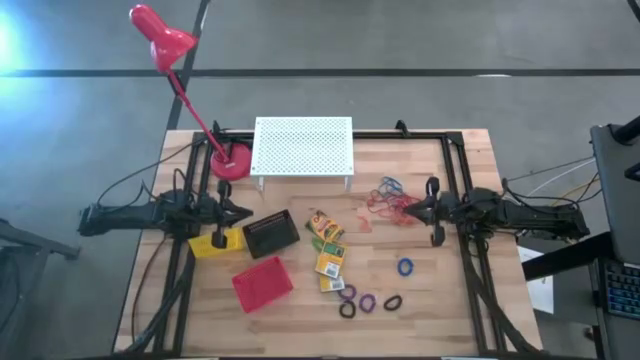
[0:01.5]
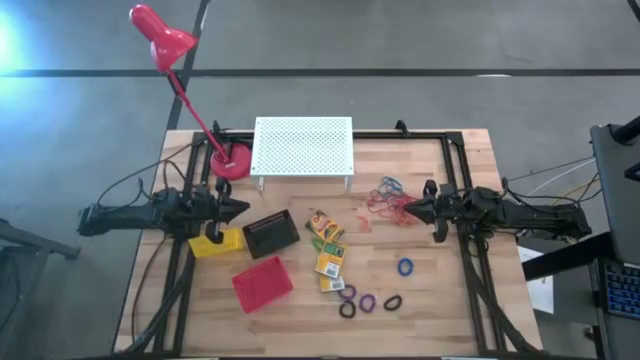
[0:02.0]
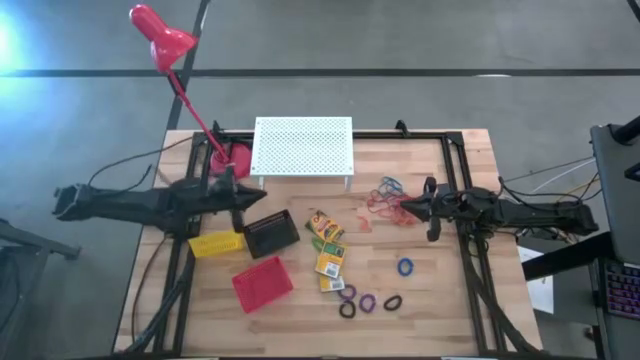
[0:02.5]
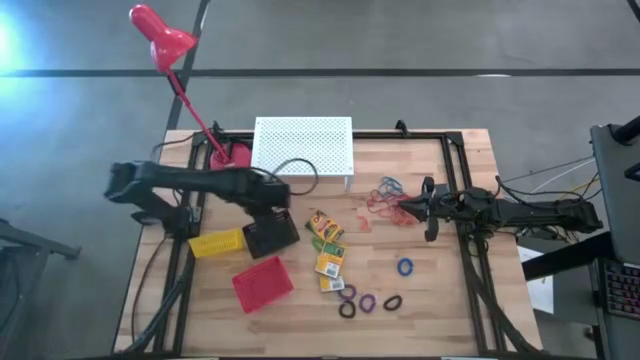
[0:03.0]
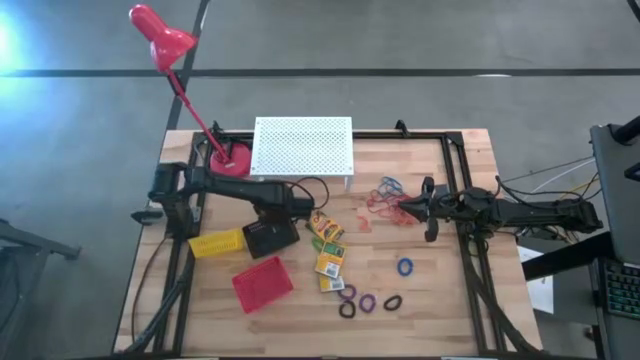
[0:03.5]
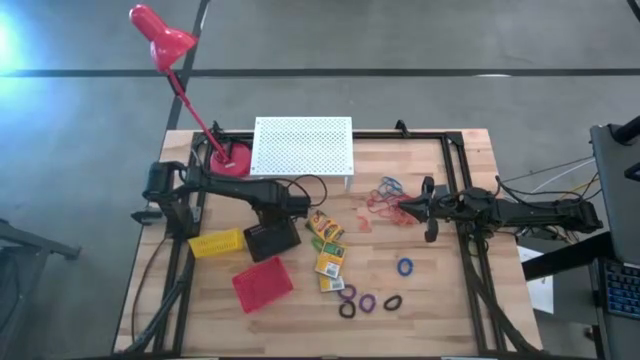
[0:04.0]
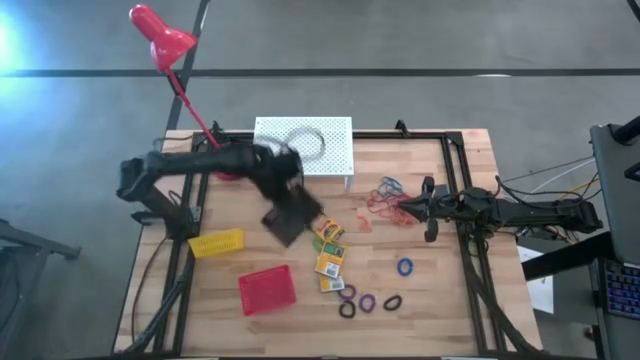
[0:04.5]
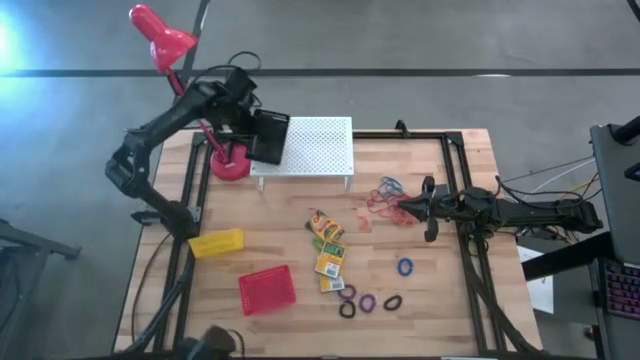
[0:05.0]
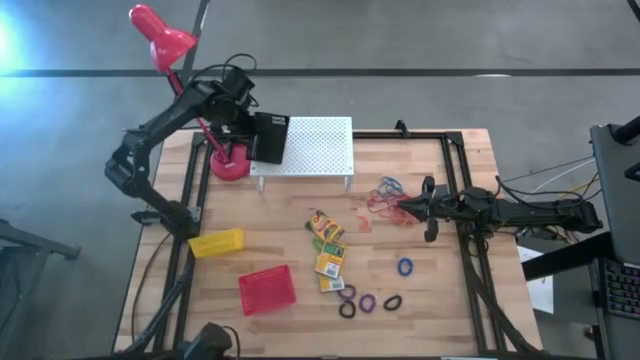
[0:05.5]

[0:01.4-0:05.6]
Task: Pick & Place Office Desk Supplies
Put the black bin on the shelf

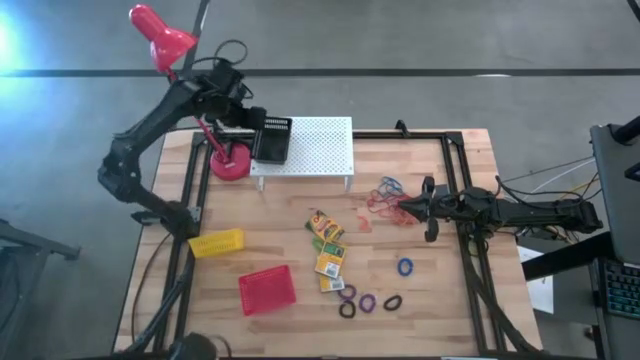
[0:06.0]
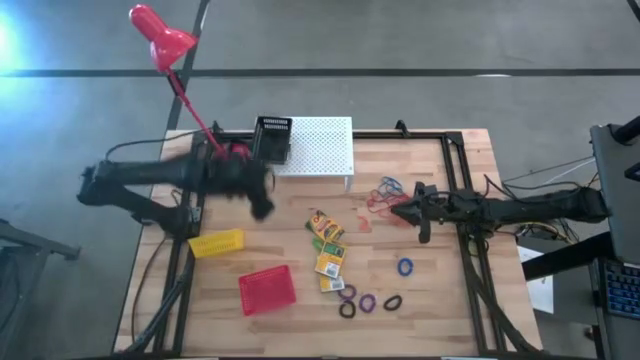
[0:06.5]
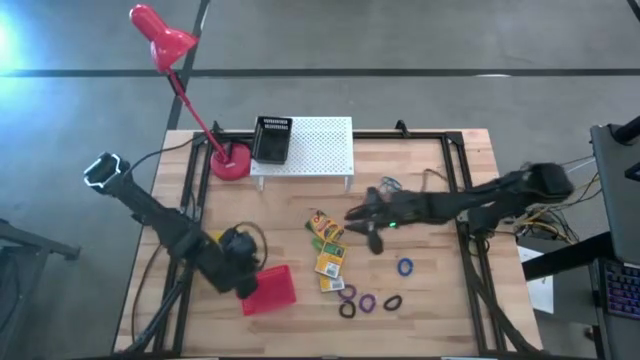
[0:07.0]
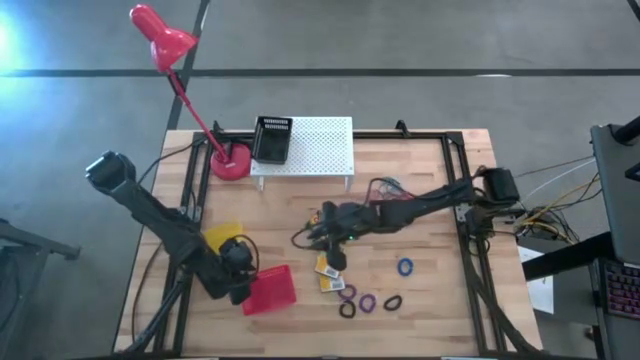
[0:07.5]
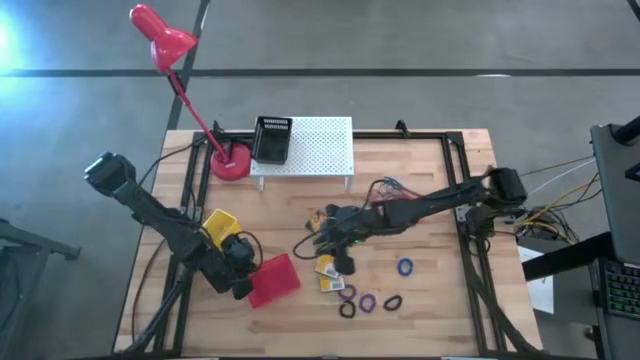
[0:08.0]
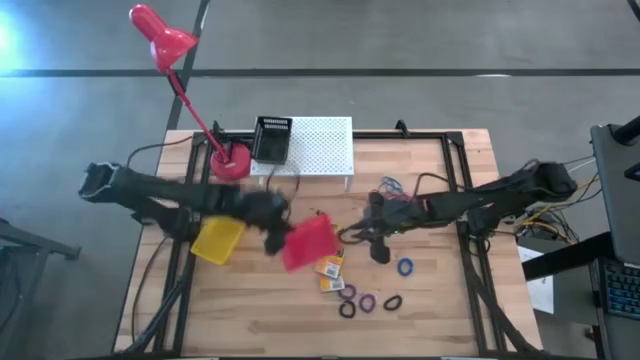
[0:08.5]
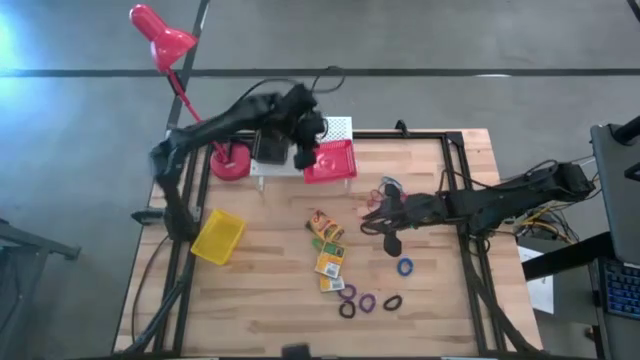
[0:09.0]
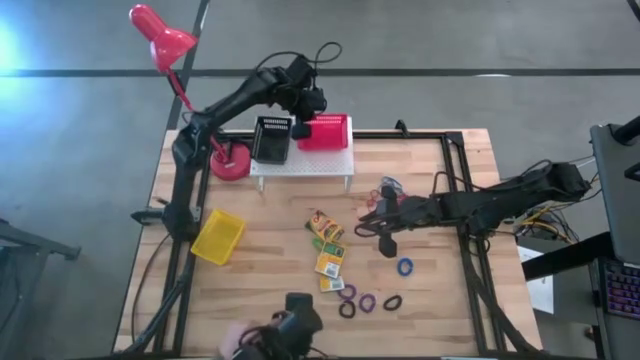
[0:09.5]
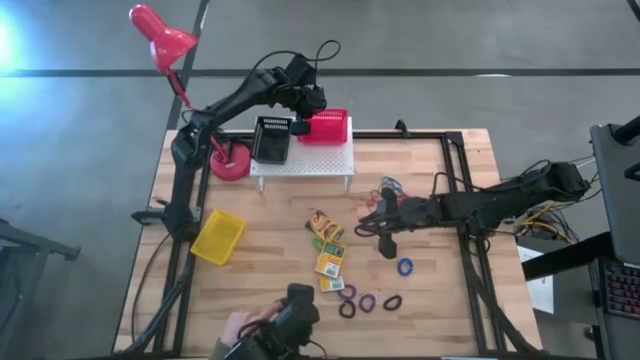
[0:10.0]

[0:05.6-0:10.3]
Put the red bin on the shelf on the shelf

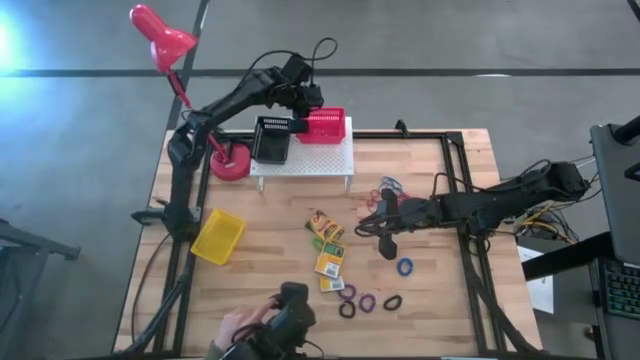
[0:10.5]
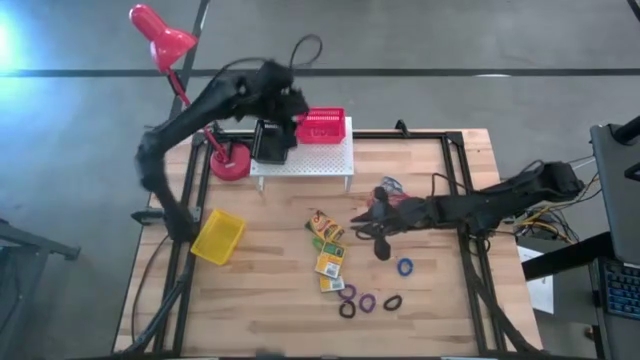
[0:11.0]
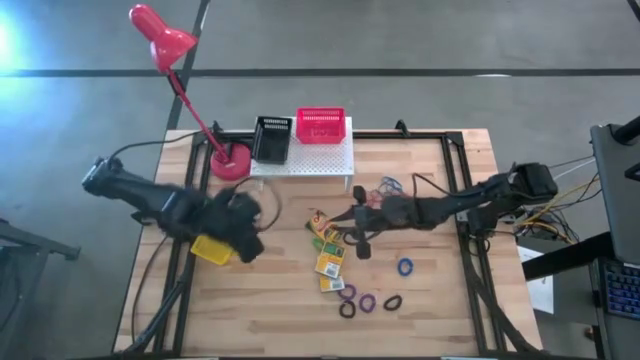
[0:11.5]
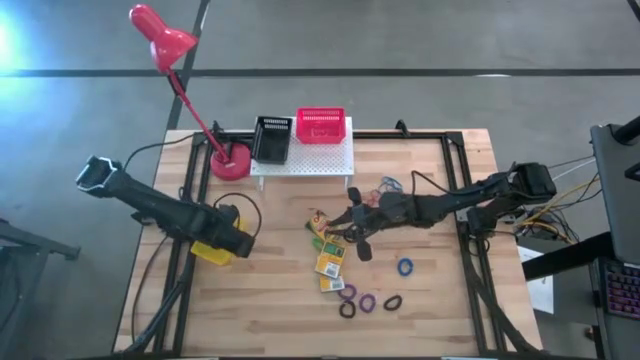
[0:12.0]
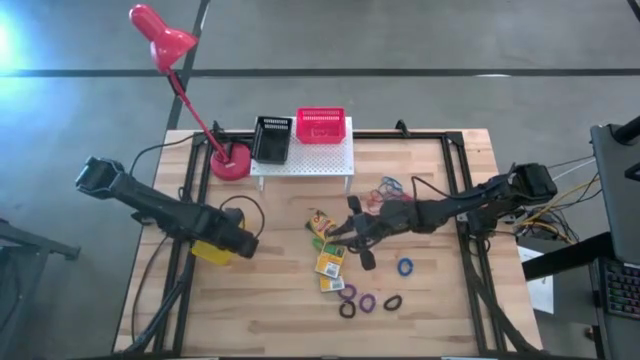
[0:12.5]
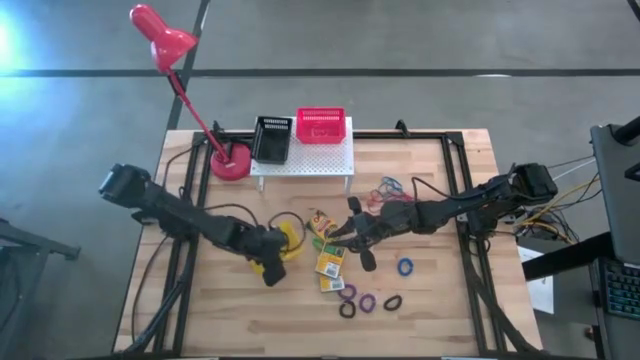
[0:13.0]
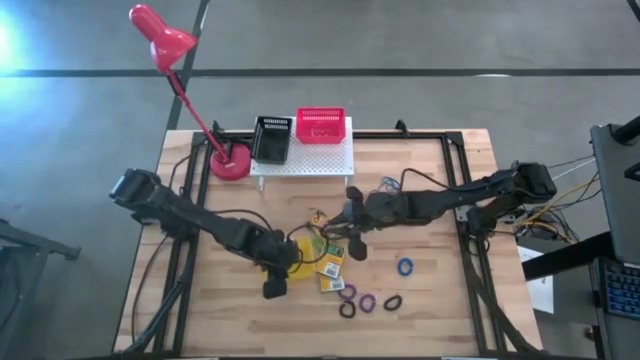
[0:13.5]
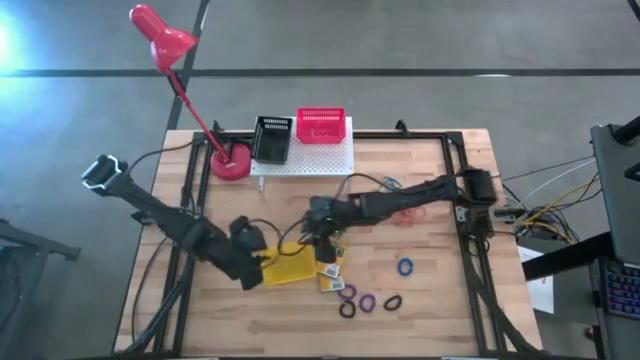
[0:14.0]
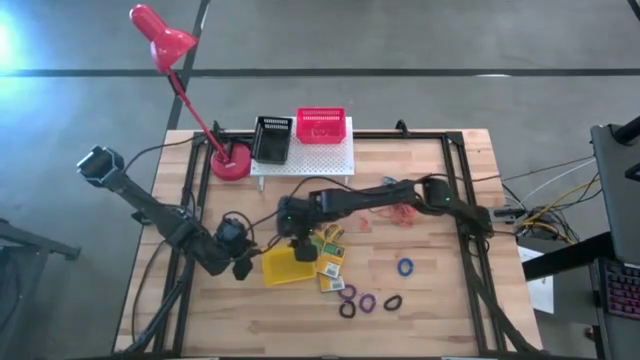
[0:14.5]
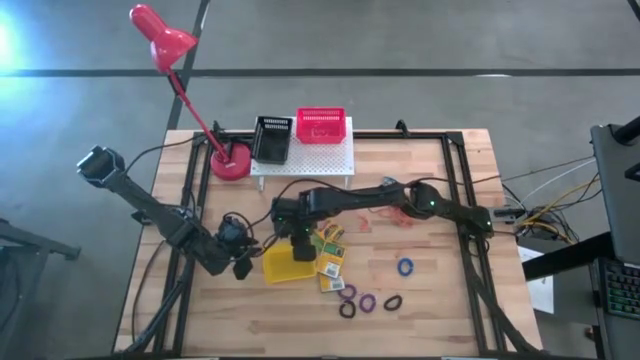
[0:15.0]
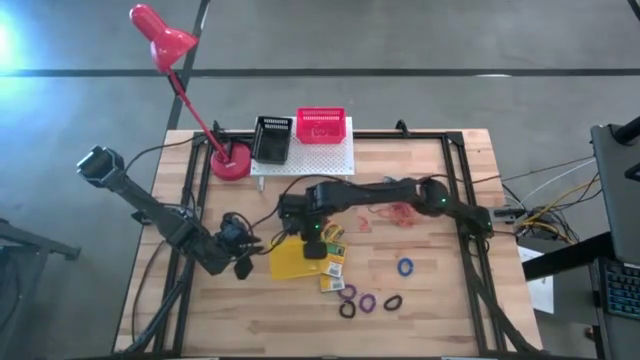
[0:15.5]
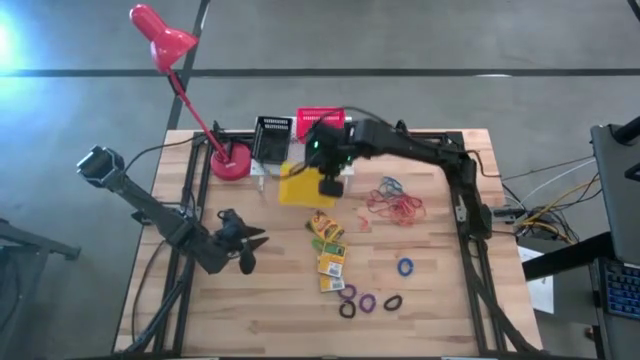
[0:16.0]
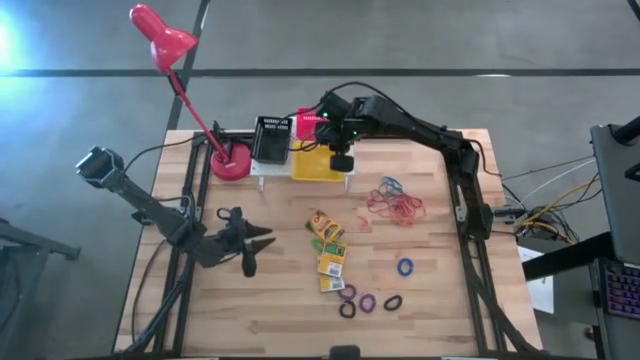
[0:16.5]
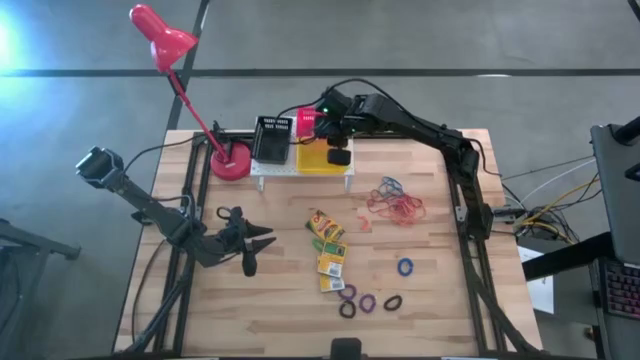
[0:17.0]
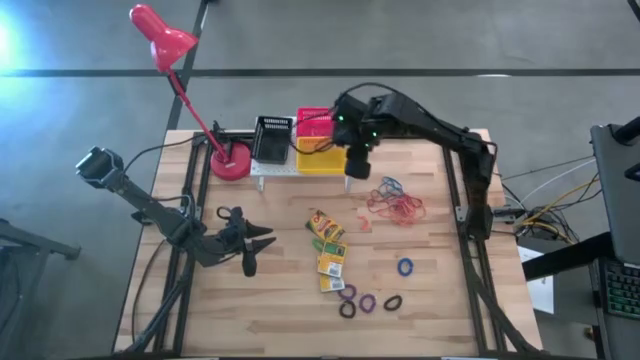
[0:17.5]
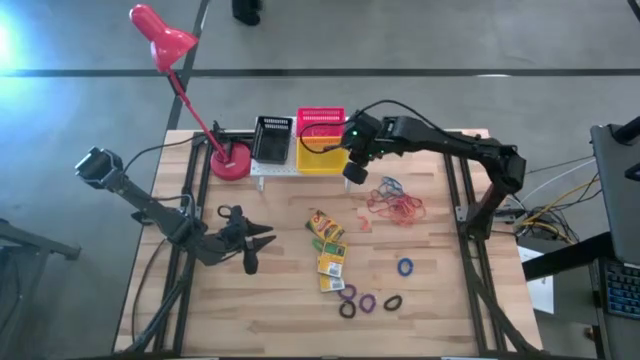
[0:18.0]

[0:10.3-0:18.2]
Put the yellow bin on the shelf

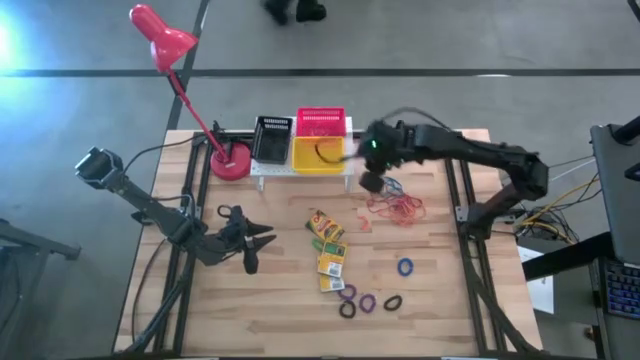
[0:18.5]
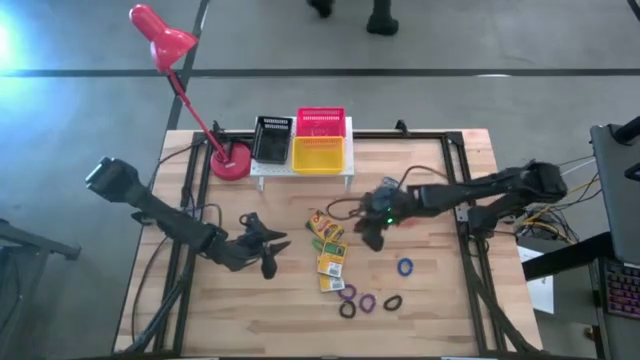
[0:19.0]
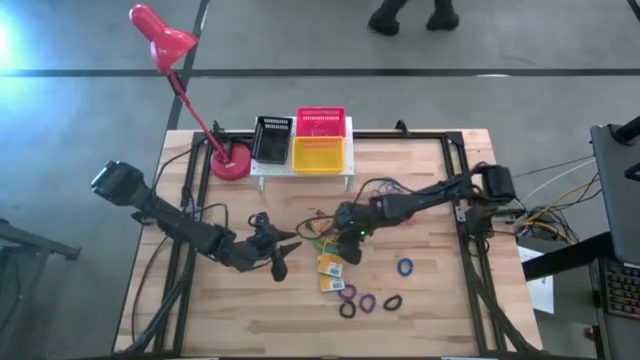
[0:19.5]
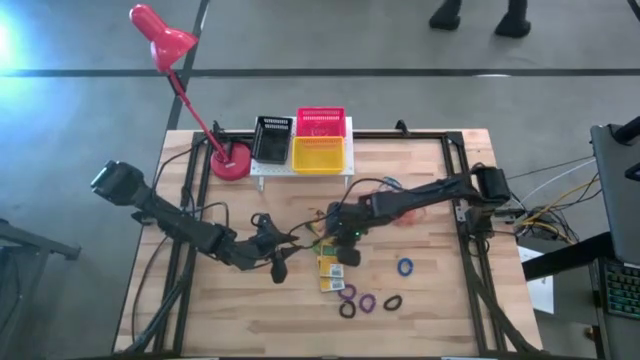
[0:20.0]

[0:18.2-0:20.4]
Put the center yellow crayon box into the yellow bin on the shelf

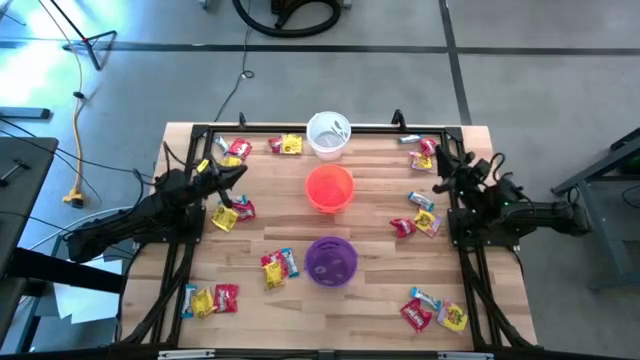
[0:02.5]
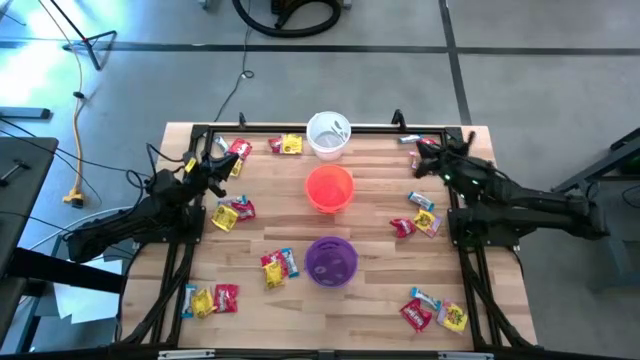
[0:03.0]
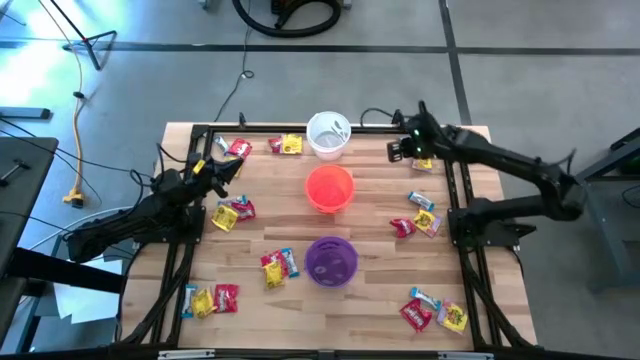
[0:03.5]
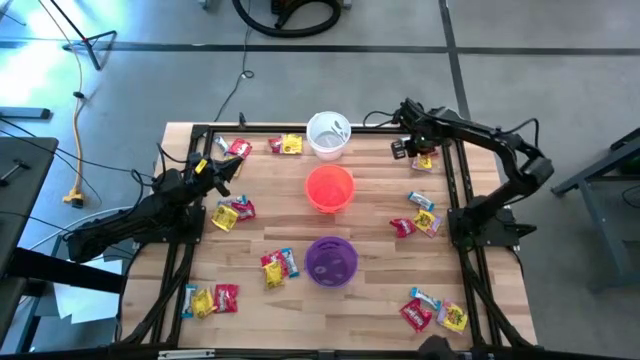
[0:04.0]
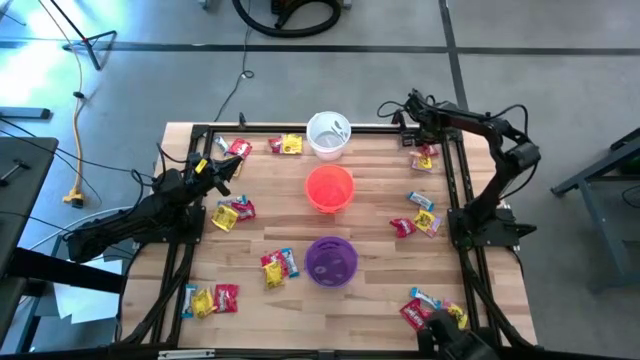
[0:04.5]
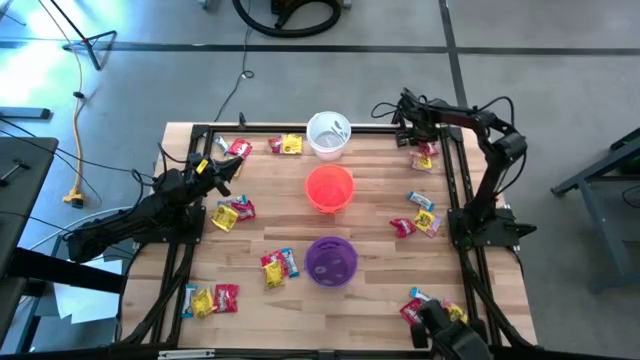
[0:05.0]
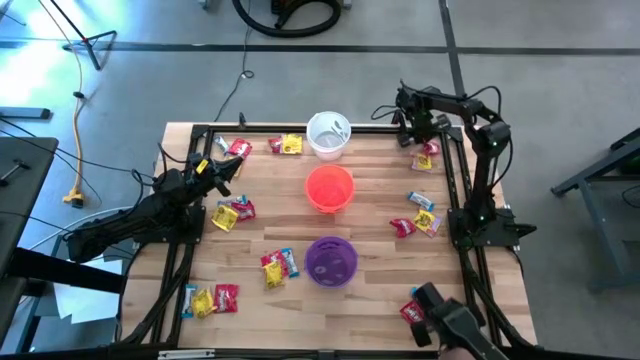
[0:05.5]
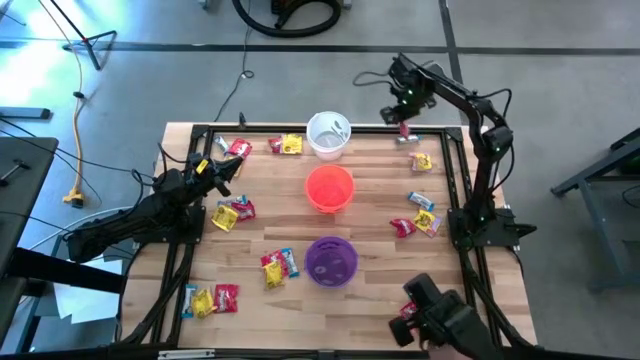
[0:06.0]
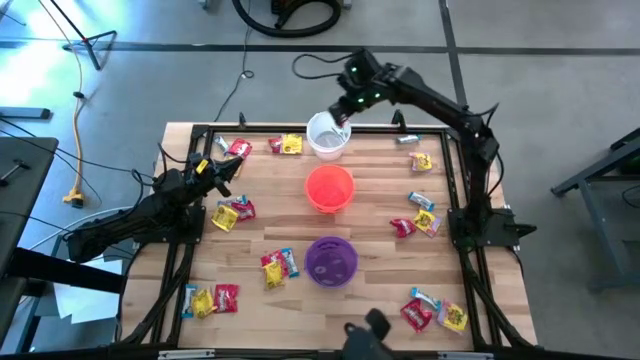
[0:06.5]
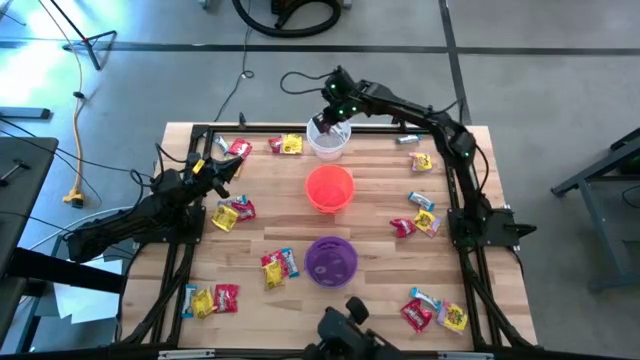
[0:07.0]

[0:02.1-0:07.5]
Task: Sort candy
Put the red candy into the white bucket
